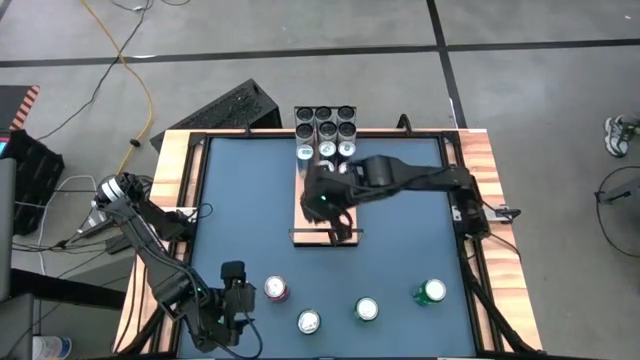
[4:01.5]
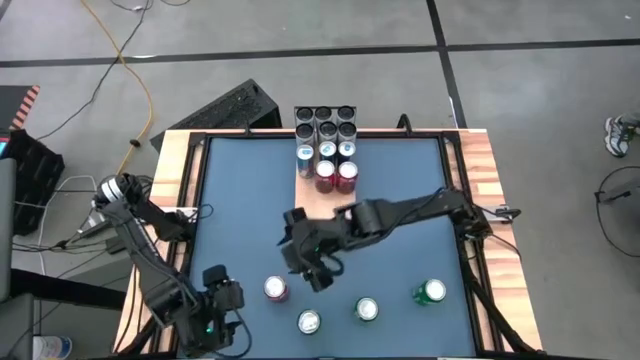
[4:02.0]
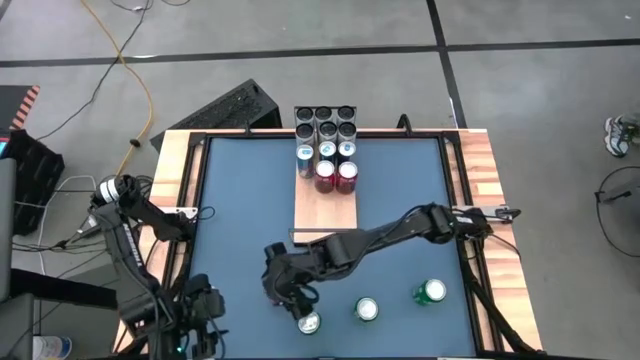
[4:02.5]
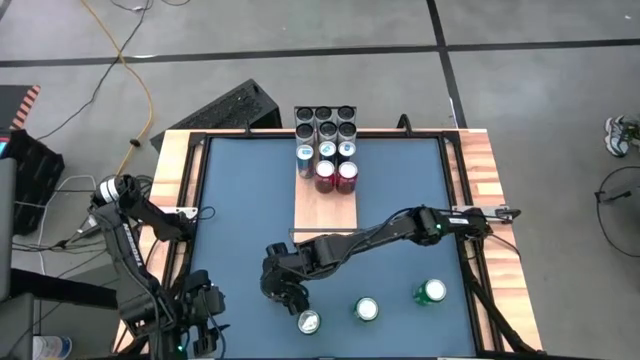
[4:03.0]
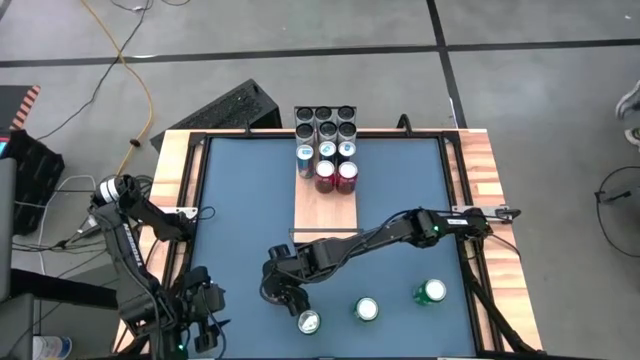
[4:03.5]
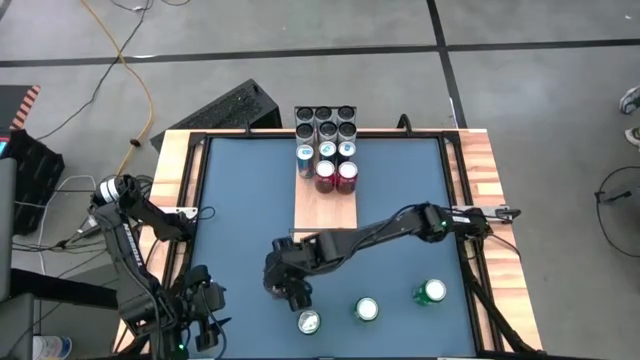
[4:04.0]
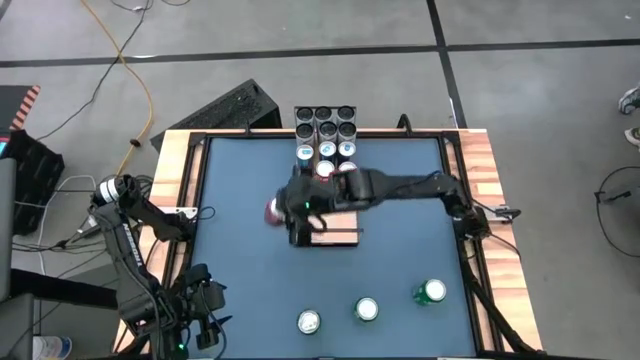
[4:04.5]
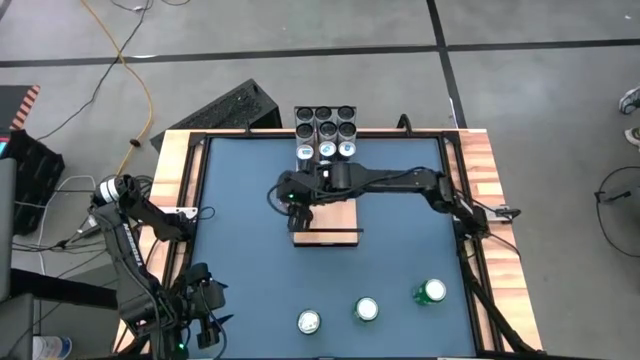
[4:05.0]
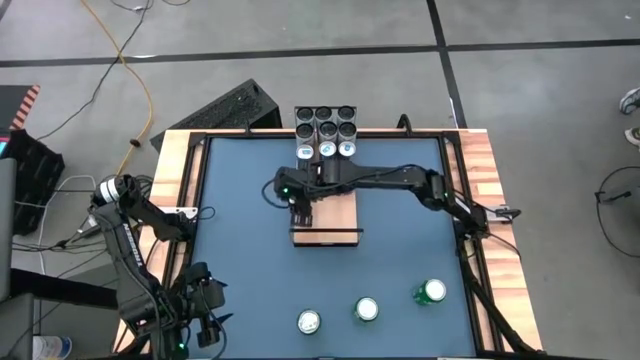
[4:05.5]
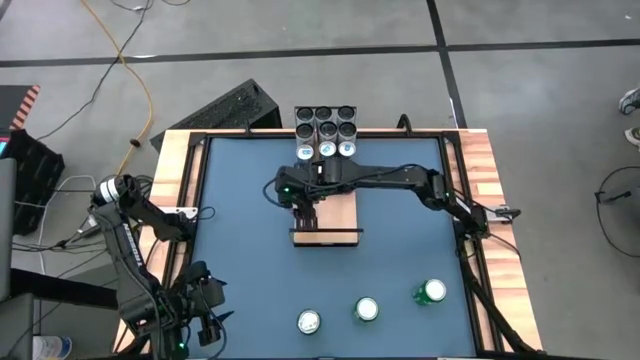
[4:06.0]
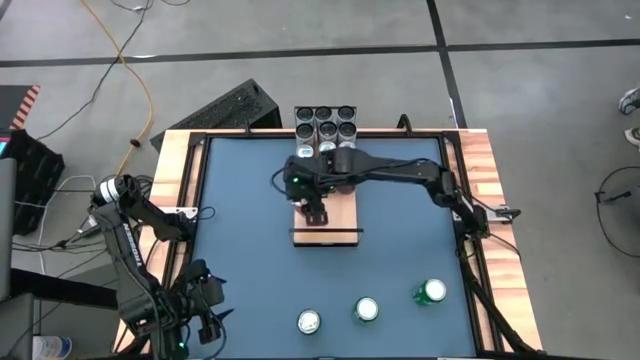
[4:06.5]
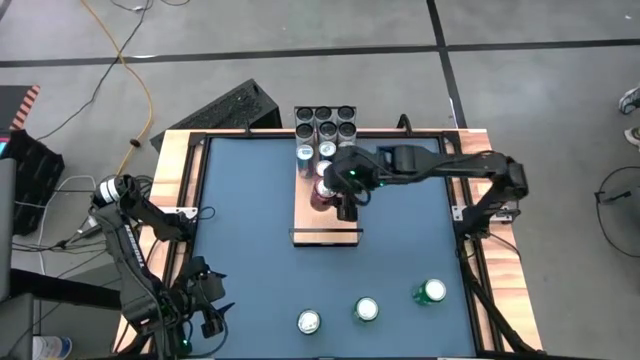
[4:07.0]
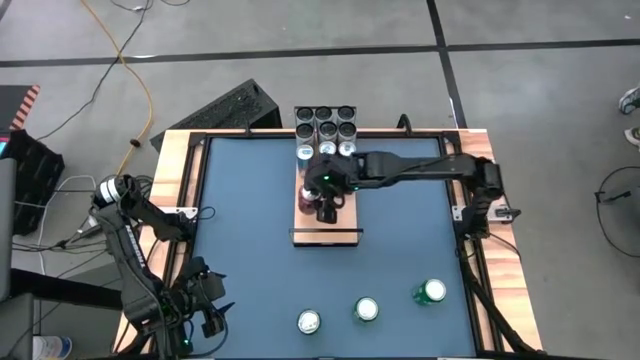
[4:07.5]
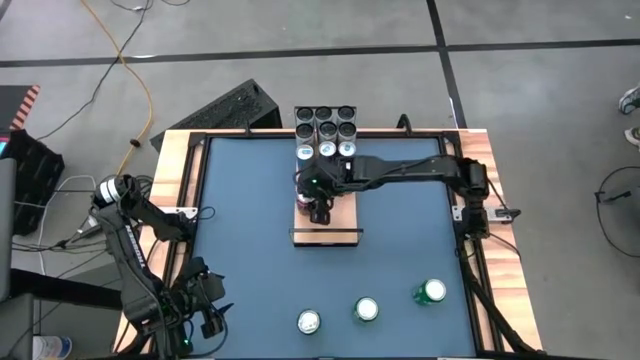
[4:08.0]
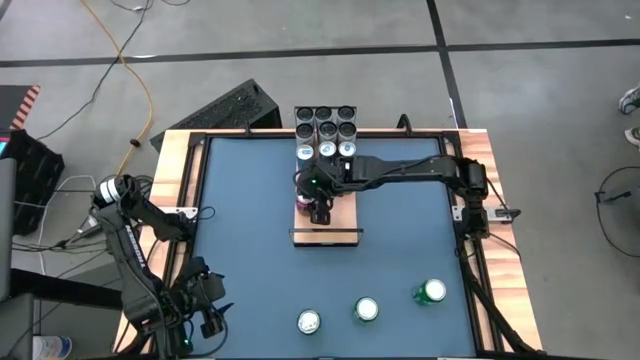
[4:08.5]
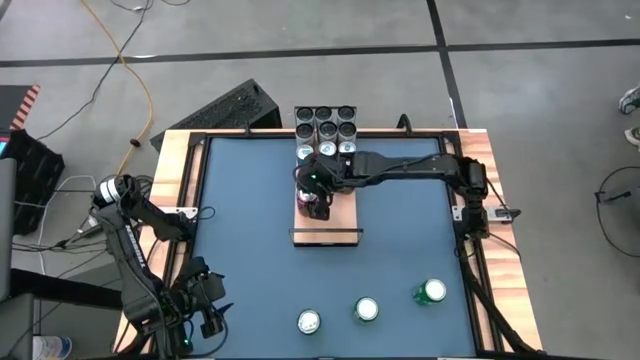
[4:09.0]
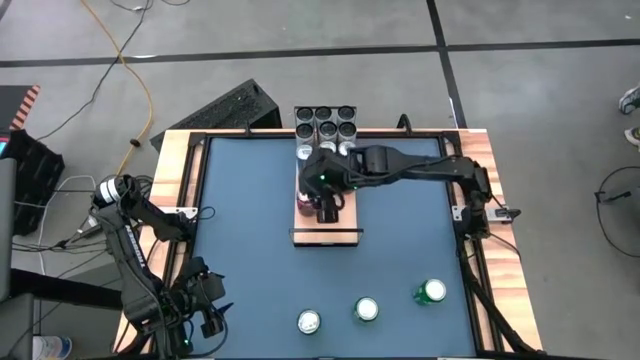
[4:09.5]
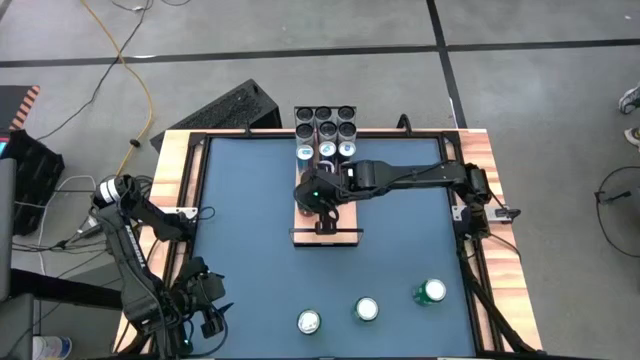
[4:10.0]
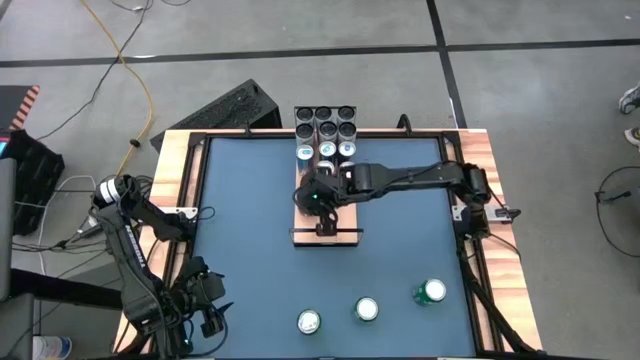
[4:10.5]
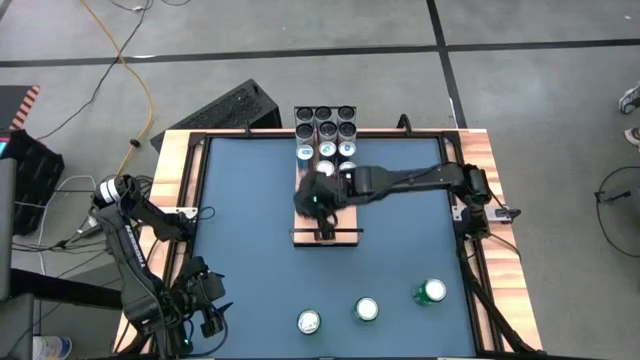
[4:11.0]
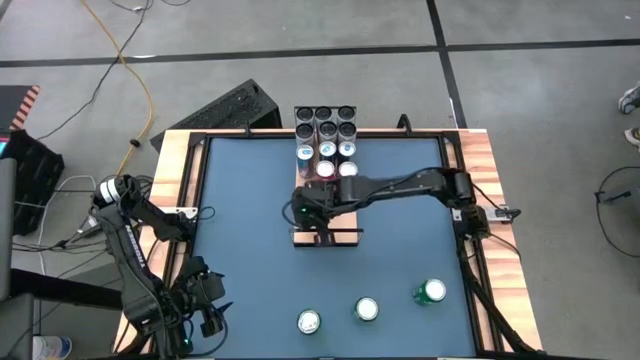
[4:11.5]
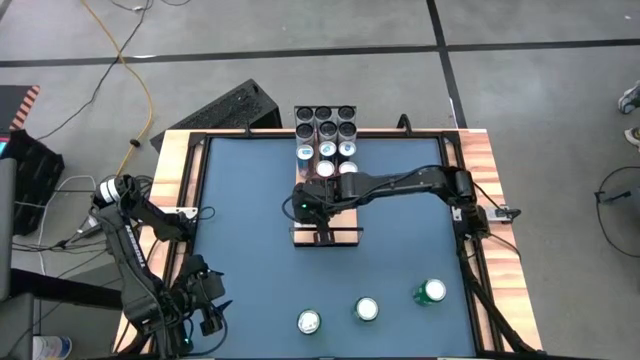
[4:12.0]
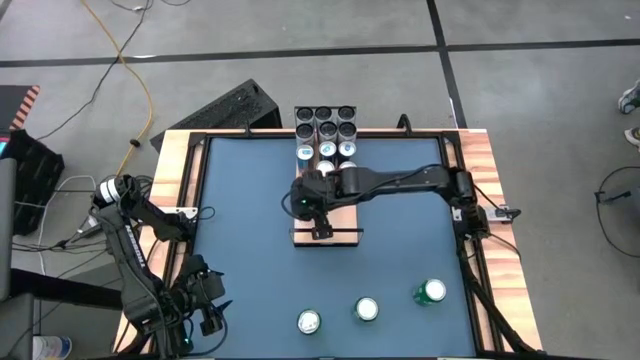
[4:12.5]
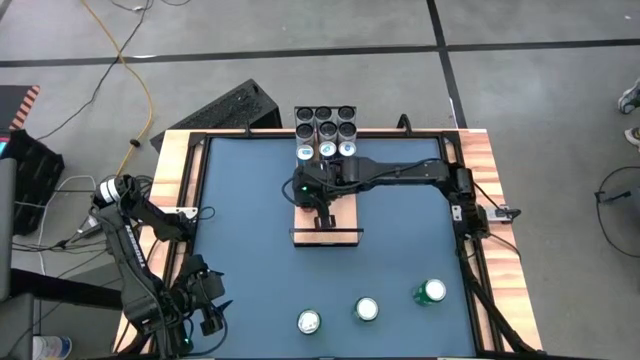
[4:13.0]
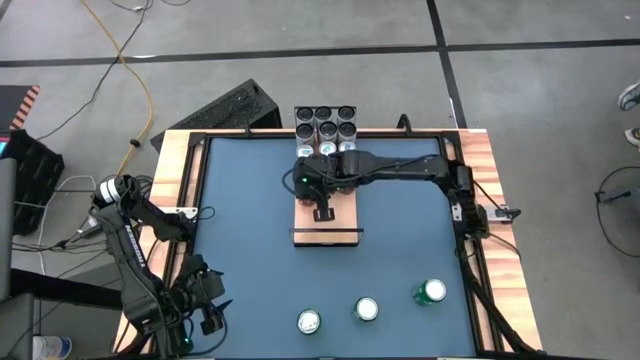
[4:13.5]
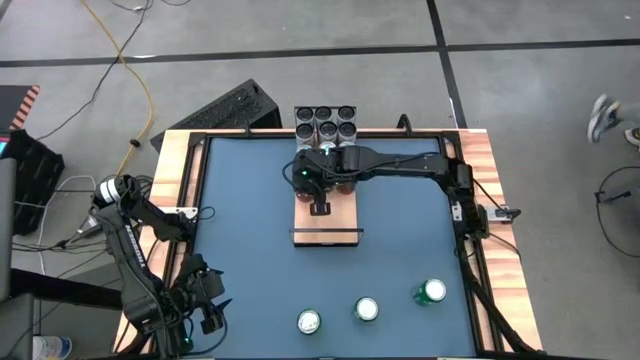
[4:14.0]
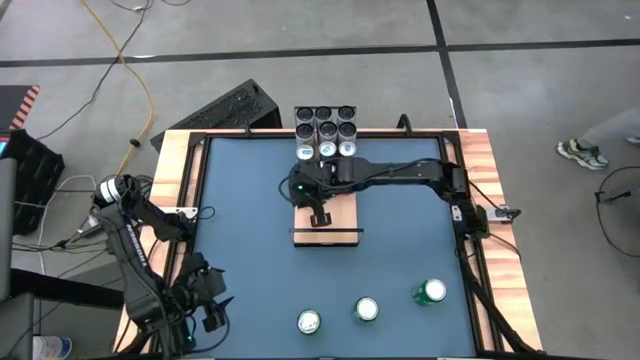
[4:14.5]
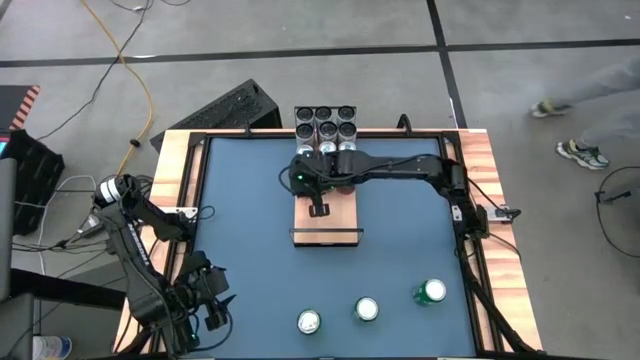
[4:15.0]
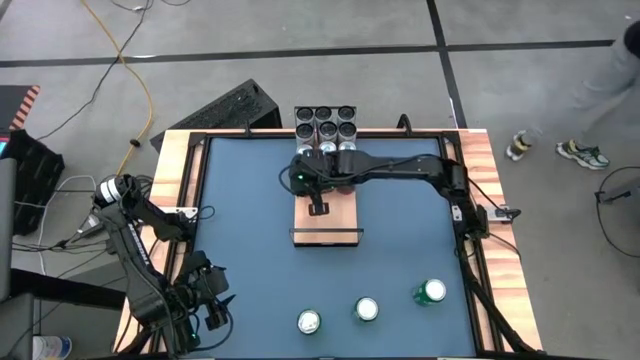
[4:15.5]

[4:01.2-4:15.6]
Task: Place canned beverage on shelf
Put the red soda can on the shelf aligned with the other red soda cans

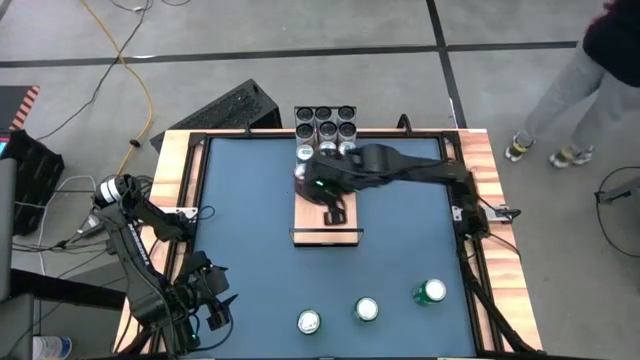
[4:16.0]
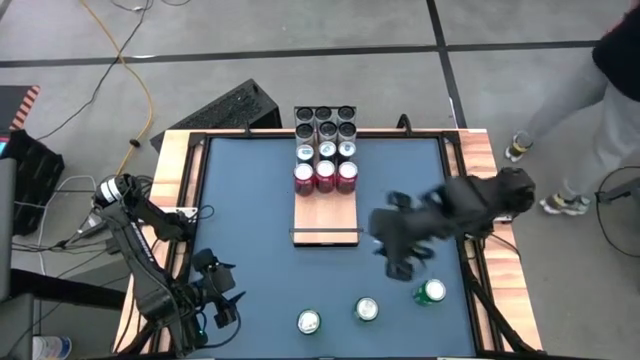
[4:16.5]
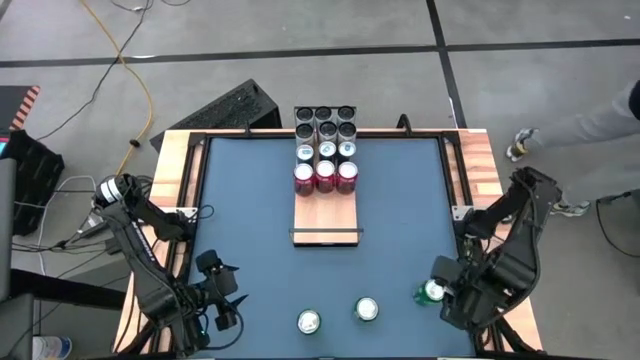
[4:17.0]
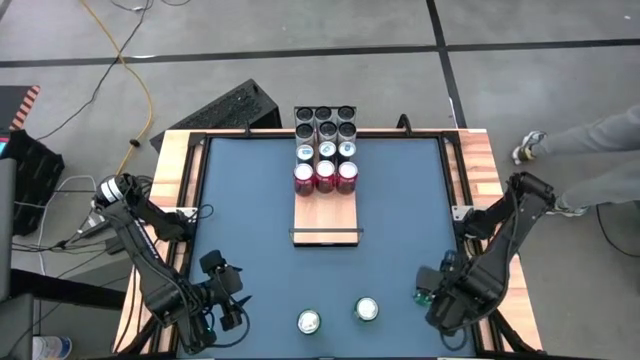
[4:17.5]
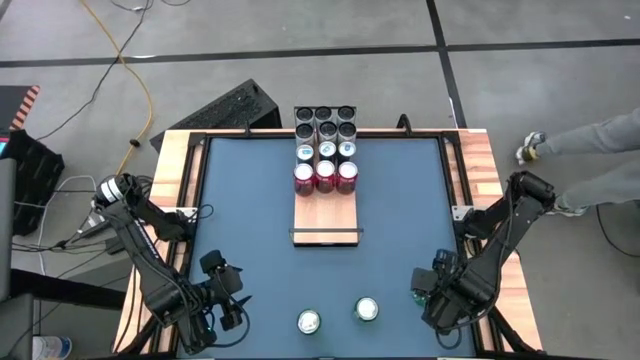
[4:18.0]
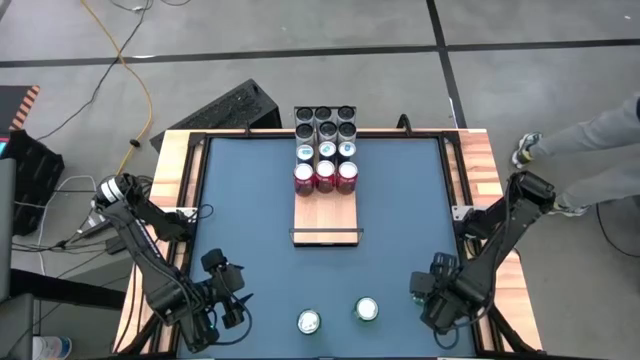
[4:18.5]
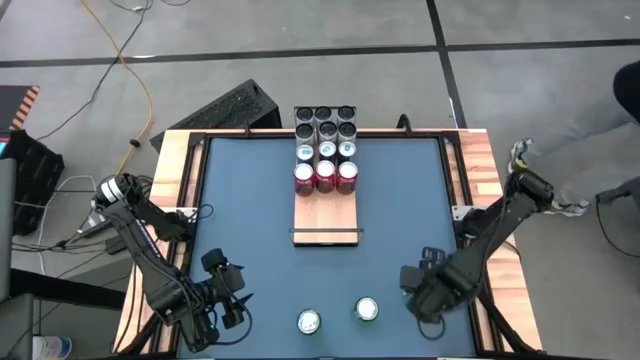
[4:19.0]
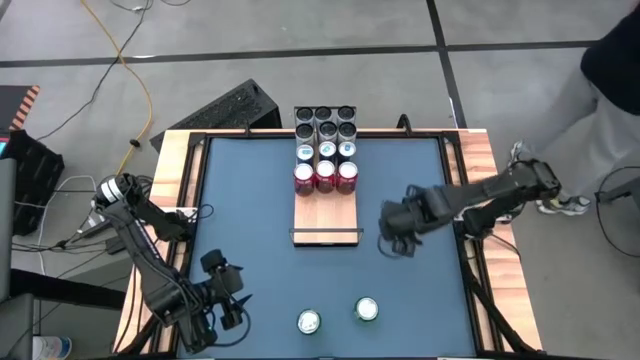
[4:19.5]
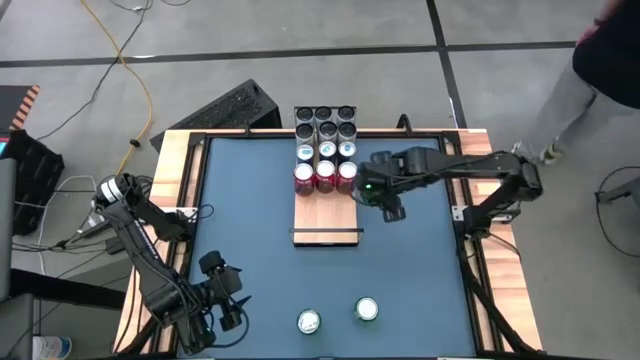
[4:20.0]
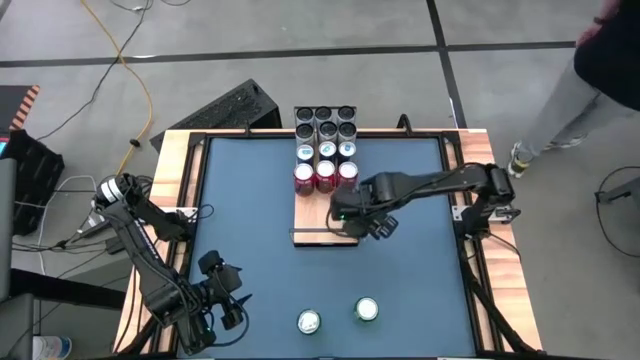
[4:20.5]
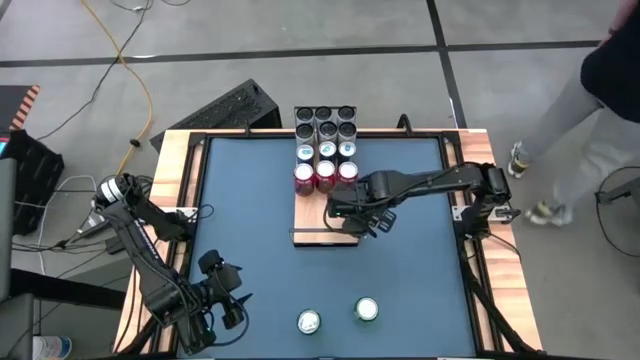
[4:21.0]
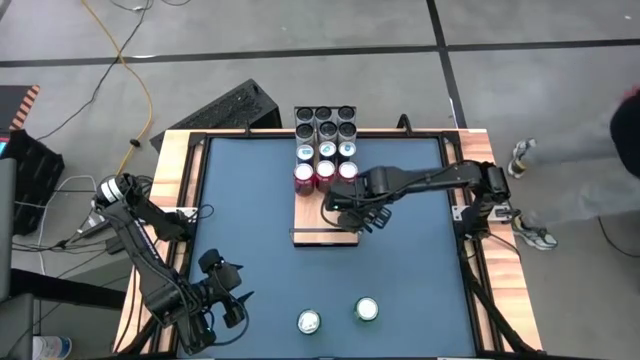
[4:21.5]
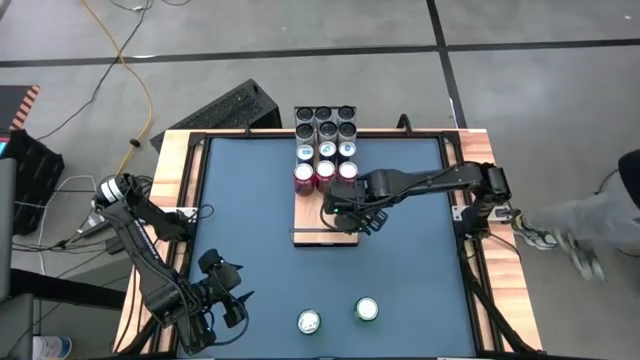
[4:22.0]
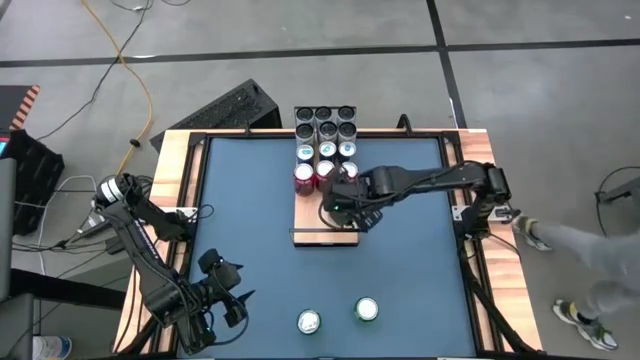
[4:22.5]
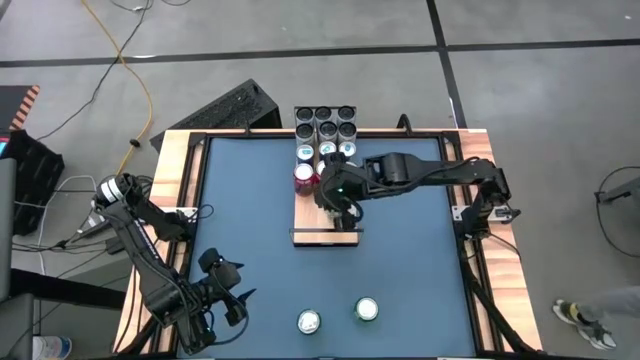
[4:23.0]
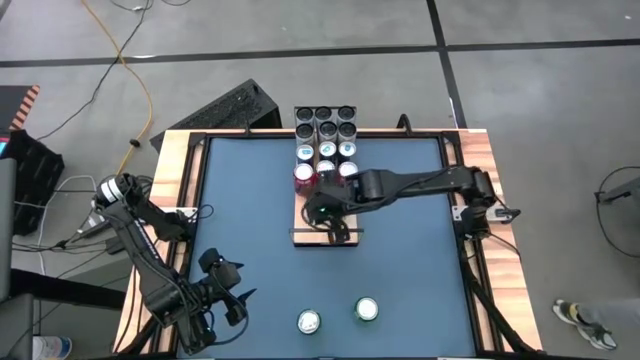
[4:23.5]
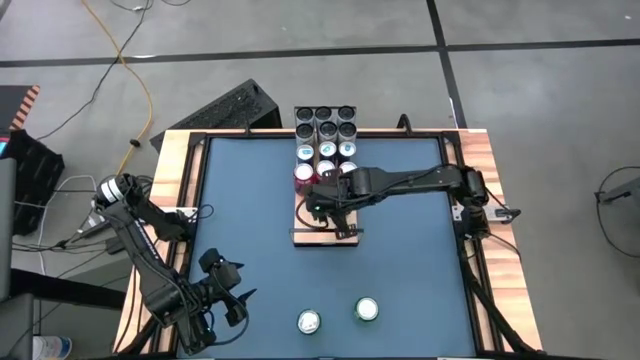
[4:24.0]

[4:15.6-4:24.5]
Put the right green soda can on the shelf
